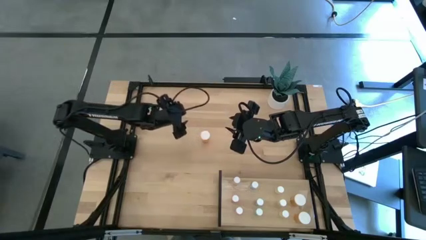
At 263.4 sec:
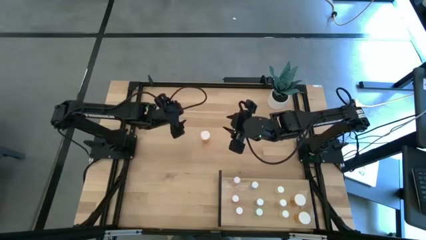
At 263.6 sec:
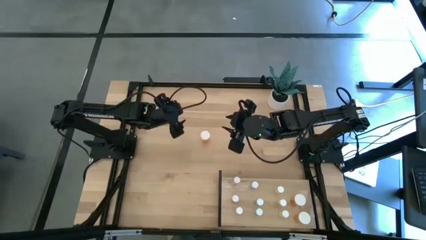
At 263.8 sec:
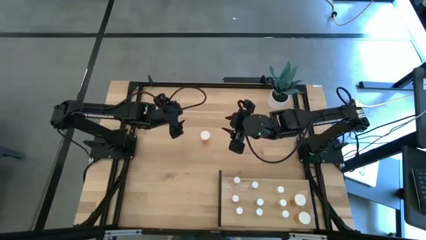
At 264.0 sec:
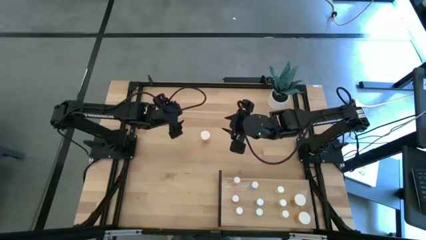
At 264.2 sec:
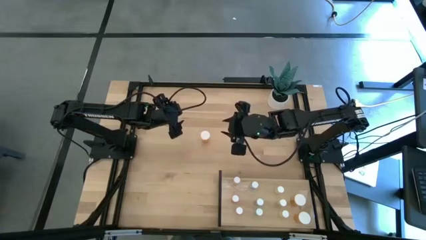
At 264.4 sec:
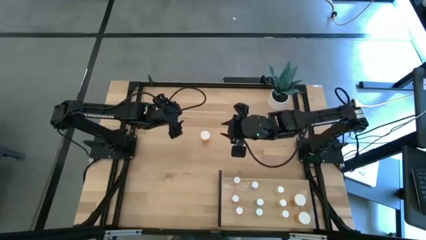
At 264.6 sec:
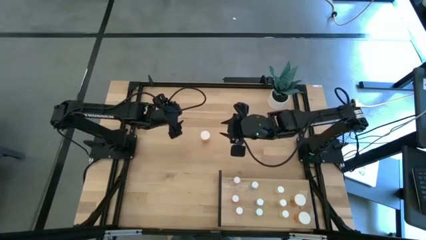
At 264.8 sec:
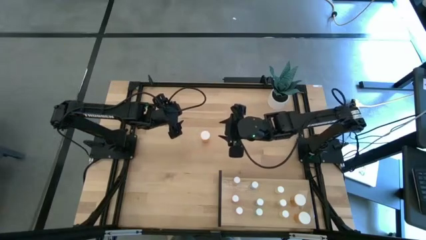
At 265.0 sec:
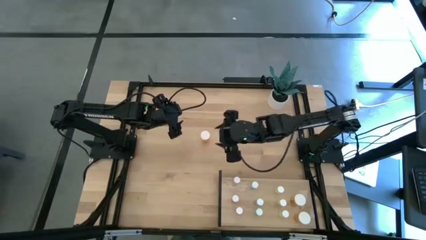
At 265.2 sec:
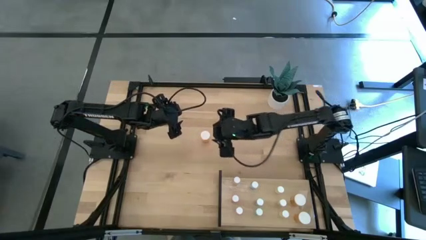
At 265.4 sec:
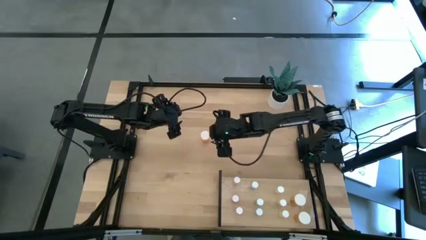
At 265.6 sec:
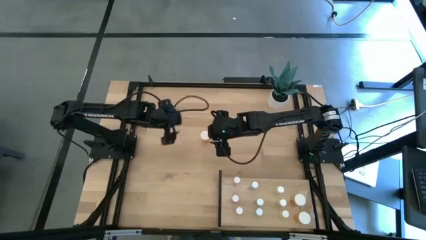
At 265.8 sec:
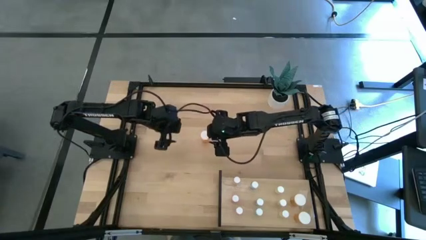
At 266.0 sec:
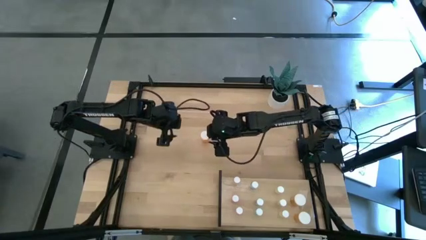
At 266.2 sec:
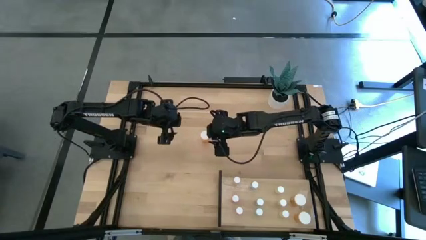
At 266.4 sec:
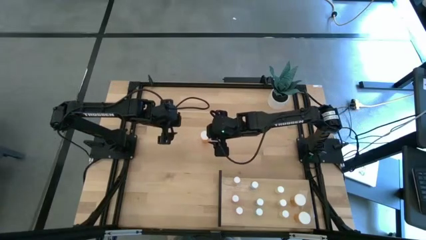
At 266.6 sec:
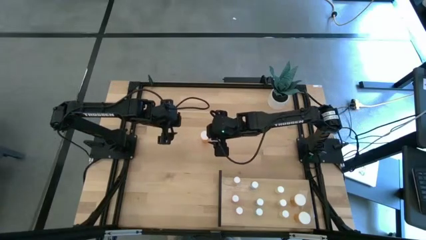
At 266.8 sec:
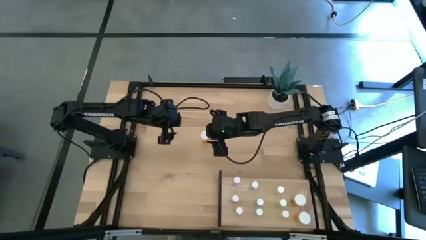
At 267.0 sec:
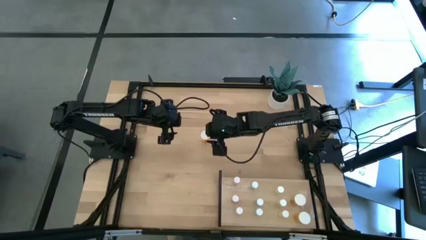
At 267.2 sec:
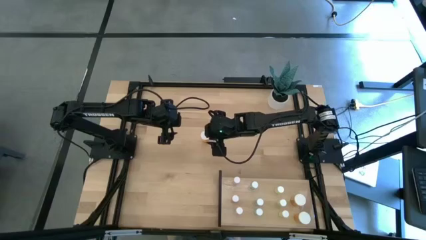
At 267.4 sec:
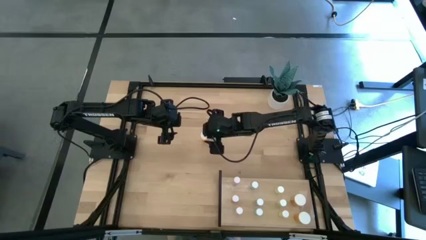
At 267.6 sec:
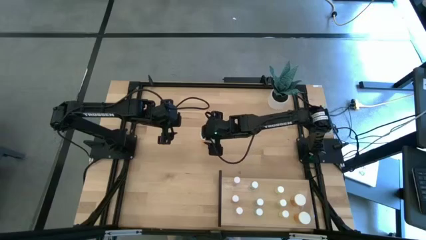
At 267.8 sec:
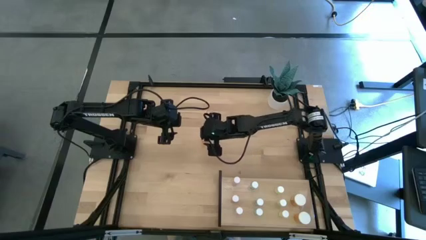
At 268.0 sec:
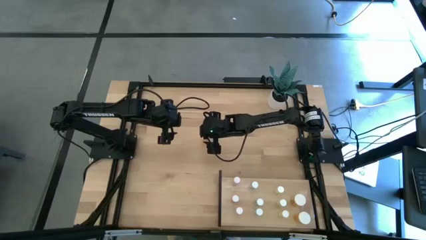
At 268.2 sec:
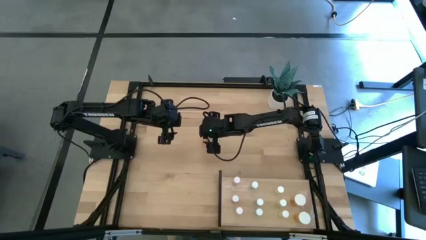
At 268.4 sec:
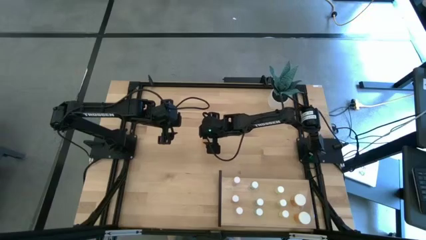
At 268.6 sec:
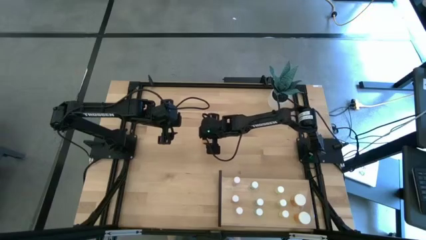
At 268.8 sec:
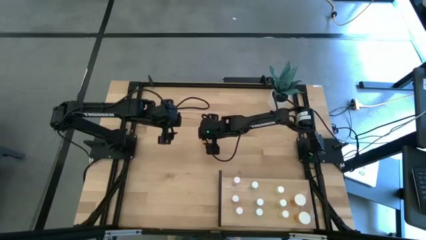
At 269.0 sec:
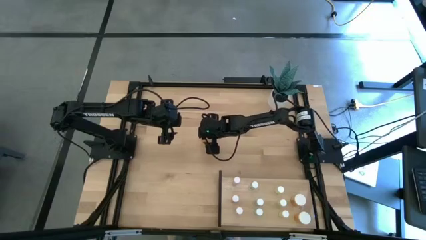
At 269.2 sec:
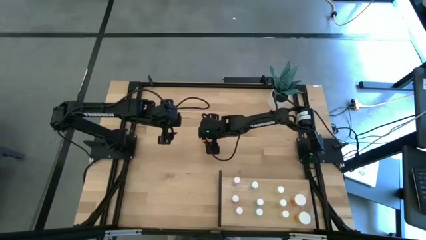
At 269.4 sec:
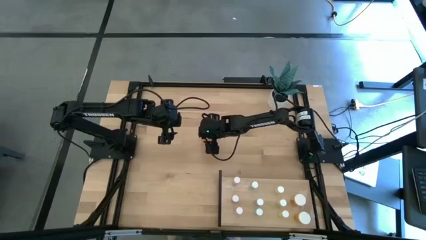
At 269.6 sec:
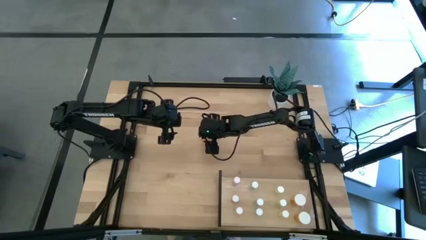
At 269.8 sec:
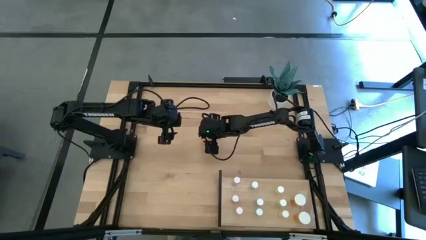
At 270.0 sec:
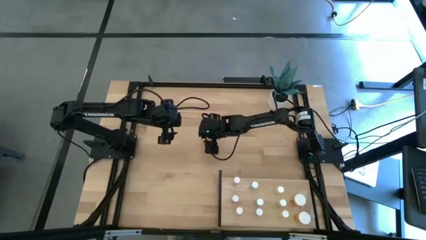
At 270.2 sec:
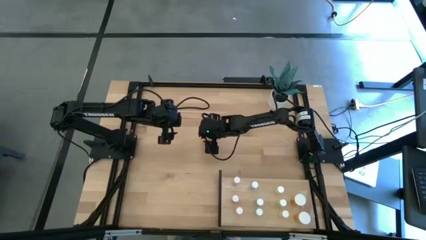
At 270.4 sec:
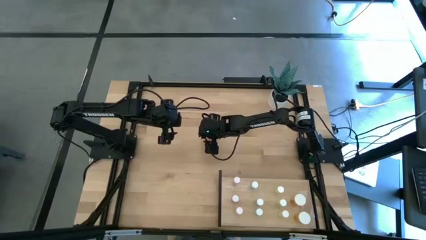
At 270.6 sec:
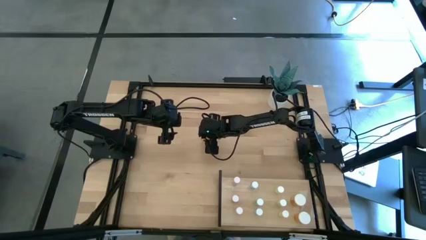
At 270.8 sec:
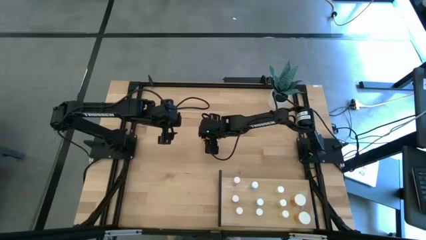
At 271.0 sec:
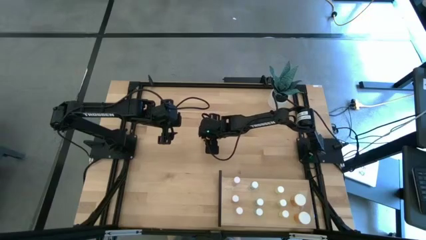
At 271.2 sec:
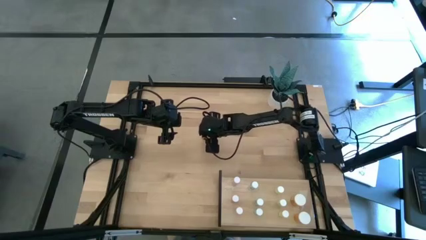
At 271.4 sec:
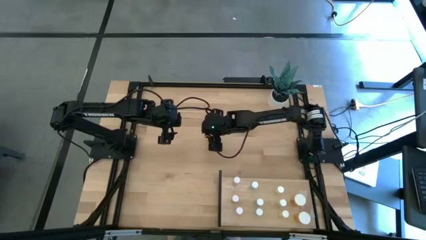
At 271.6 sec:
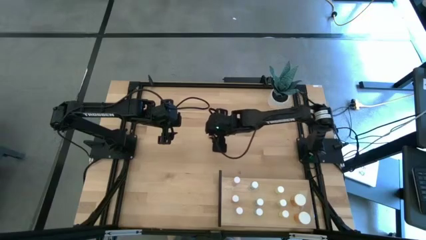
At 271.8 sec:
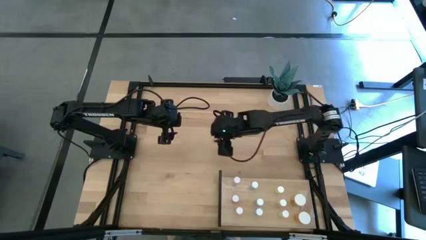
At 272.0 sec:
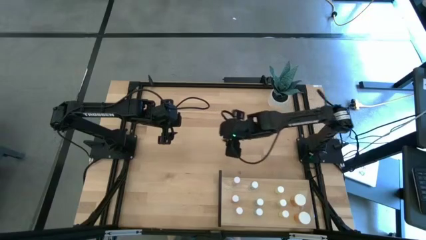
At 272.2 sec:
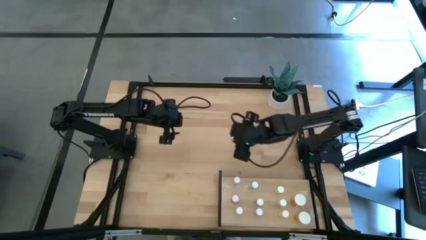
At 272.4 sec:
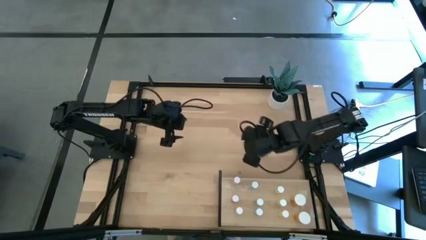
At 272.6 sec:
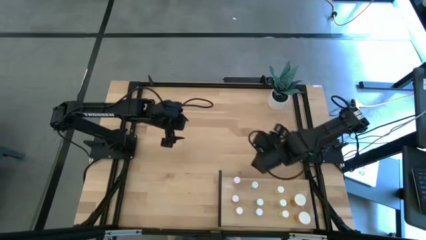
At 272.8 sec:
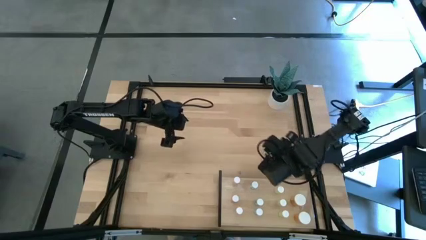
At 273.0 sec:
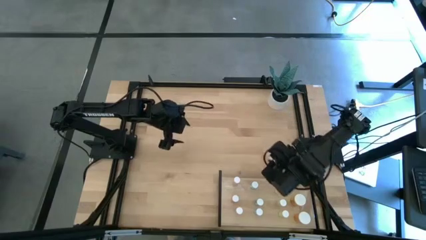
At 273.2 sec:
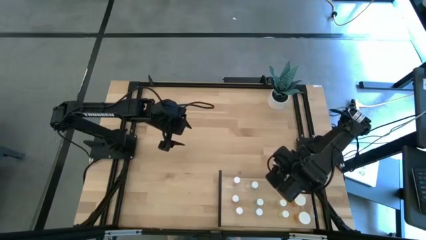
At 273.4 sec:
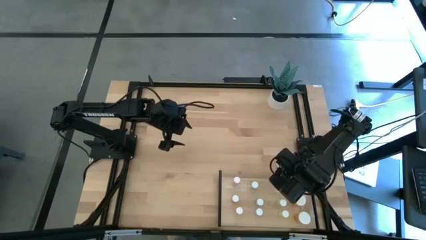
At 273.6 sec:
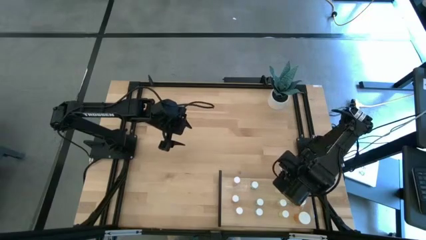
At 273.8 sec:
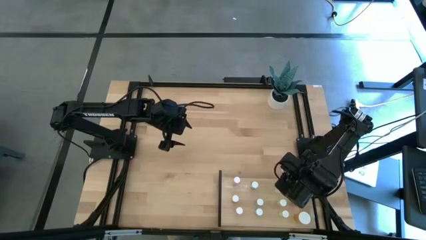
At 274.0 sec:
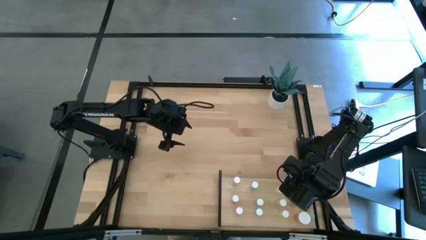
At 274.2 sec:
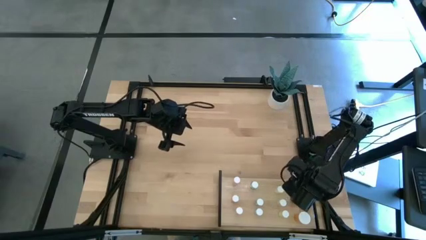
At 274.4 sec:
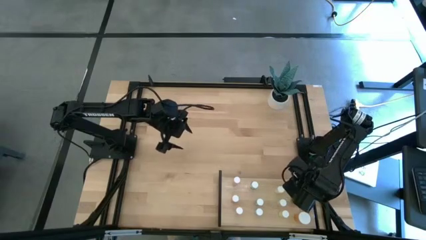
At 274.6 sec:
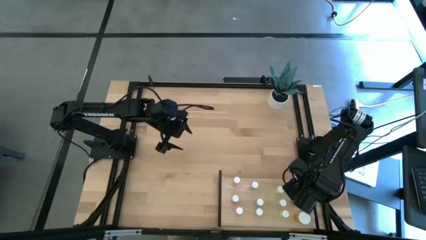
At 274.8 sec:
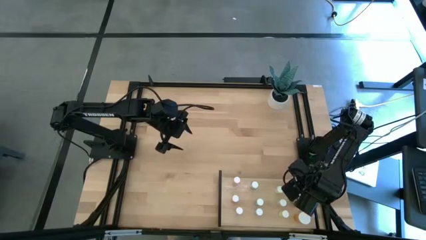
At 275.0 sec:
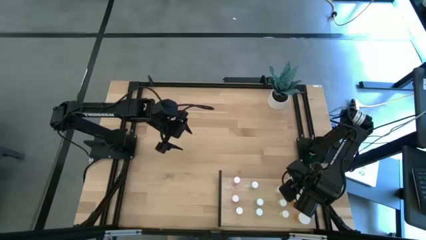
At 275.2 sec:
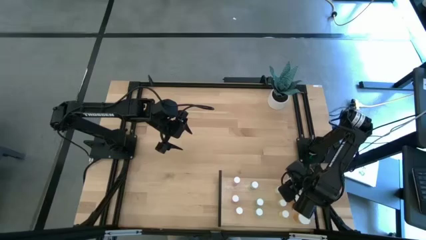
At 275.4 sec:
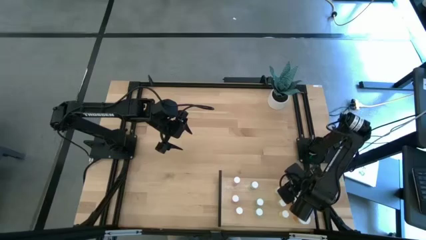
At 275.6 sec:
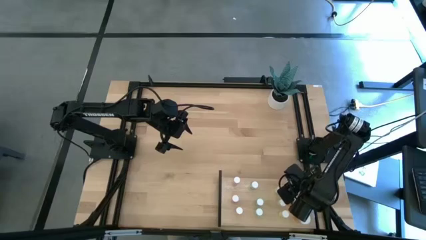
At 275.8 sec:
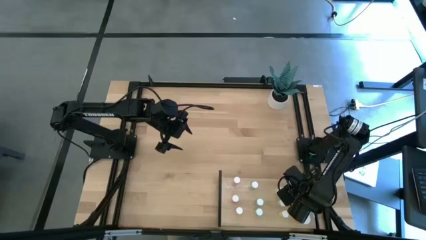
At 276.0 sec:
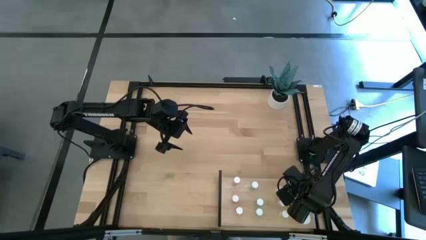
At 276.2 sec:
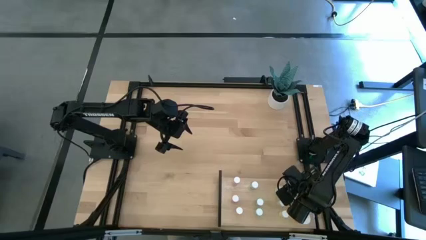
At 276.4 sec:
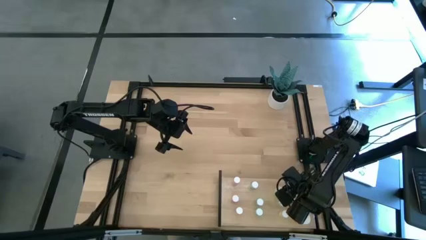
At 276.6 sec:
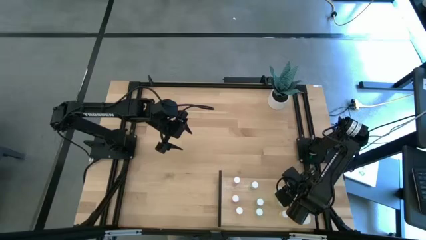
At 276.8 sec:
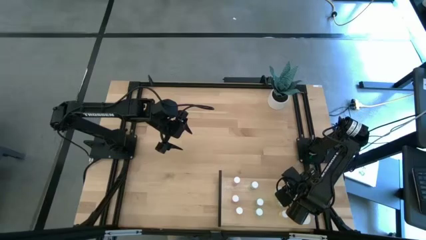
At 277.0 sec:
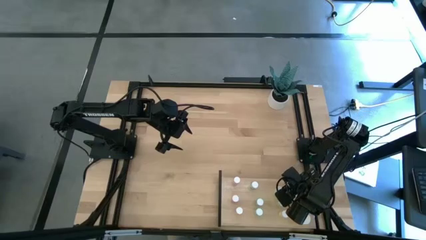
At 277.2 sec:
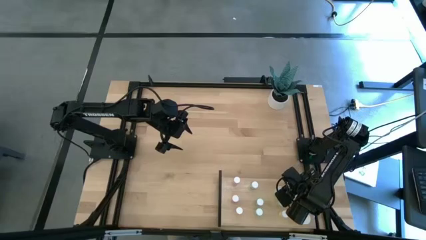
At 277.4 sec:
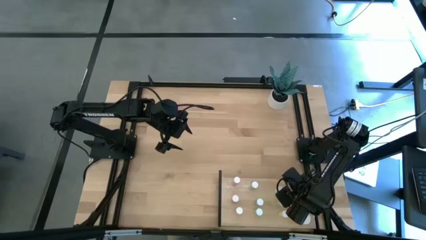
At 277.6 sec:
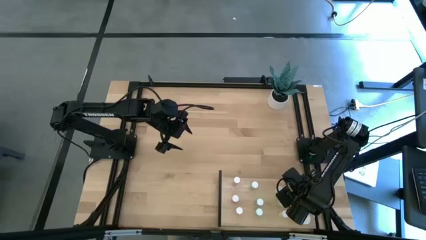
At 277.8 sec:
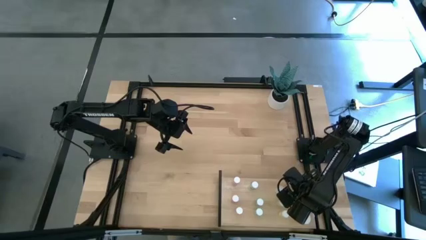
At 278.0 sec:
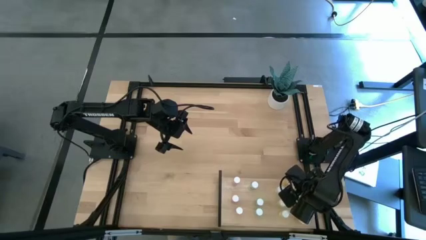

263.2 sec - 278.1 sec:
Task: Pick and place medicine bottles onto shelf by color
Put the orange pill bottle on the shelf aligned with the other orange pill bottle

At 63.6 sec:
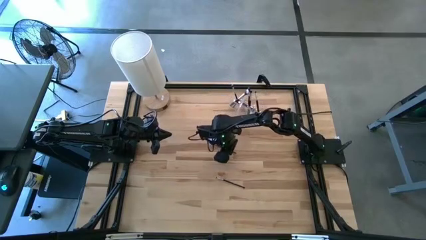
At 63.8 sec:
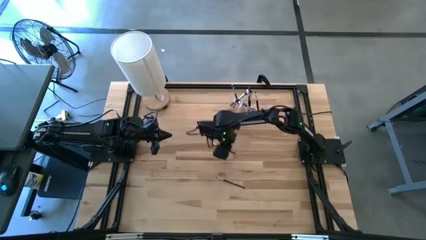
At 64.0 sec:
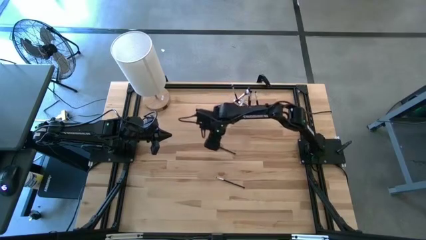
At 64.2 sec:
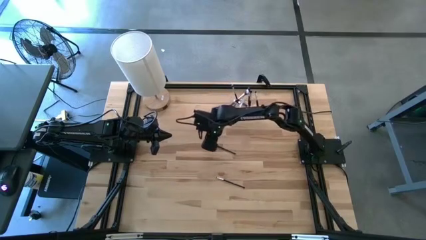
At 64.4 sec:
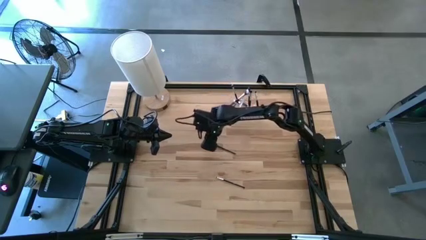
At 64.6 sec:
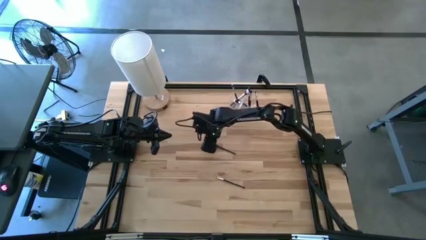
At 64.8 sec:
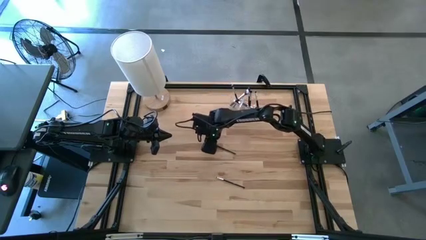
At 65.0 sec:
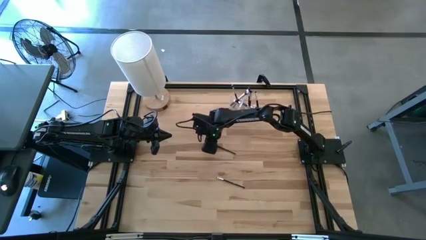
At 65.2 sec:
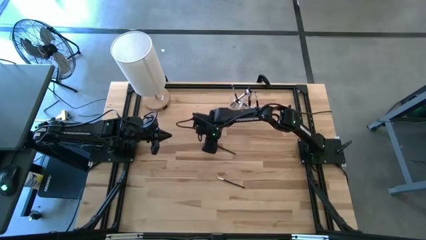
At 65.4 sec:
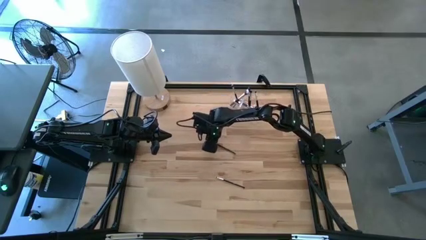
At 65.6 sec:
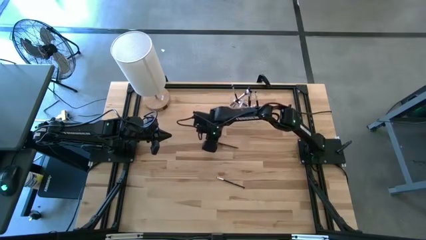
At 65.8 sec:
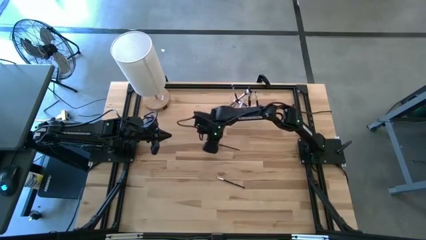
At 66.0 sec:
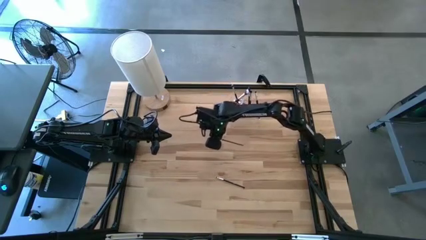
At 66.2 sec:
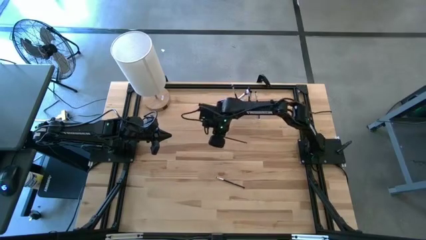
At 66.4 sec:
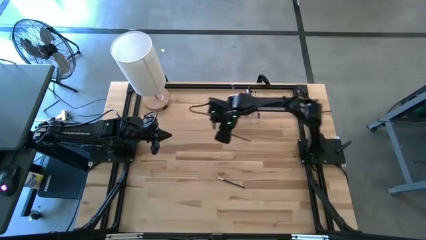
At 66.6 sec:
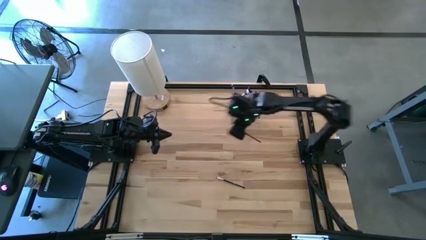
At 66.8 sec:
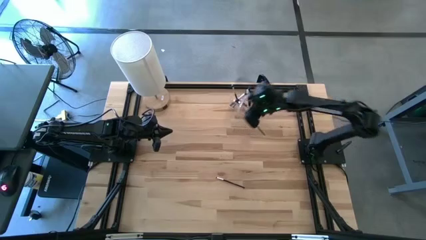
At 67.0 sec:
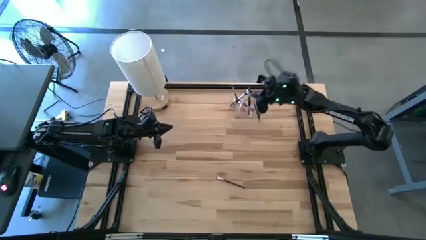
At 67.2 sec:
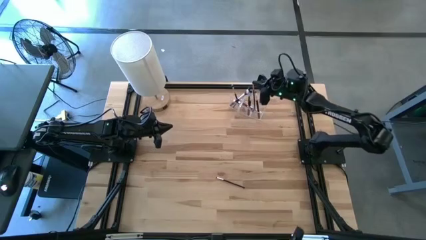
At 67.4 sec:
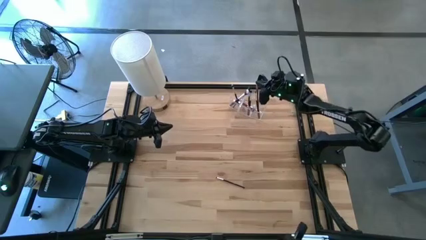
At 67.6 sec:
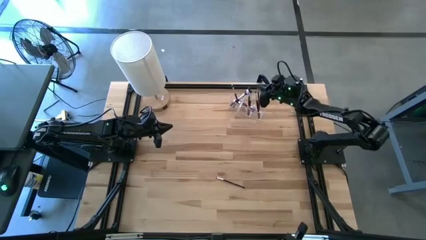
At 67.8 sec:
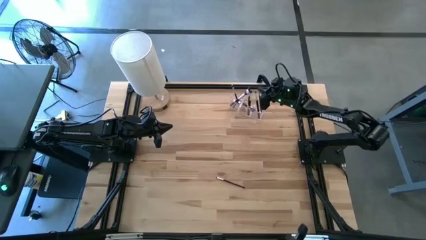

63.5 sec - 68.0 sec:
Task: Pick & Place Makeup Brushes
Put the black makeup brush into the transparent organizer
